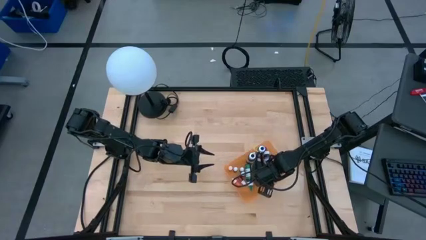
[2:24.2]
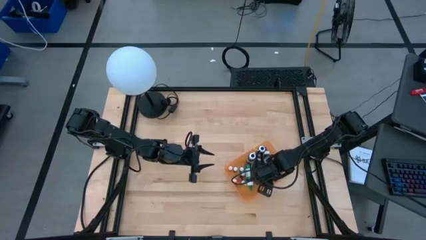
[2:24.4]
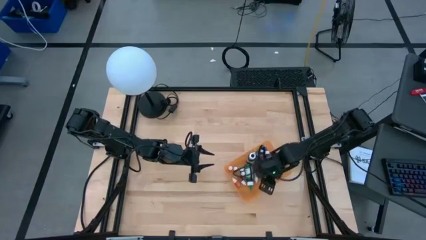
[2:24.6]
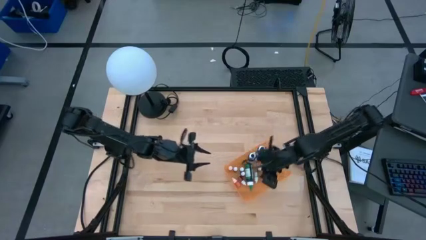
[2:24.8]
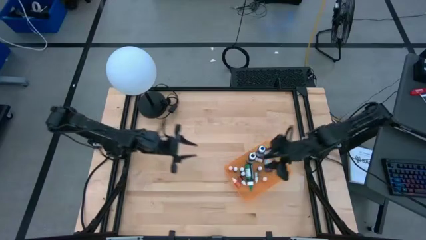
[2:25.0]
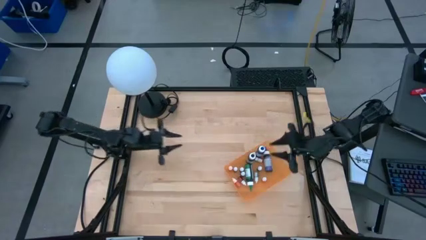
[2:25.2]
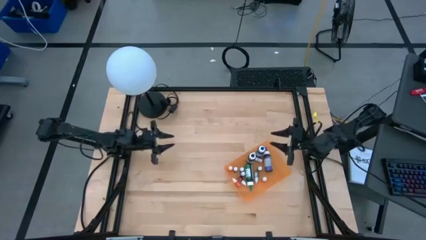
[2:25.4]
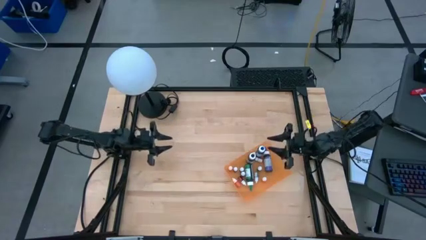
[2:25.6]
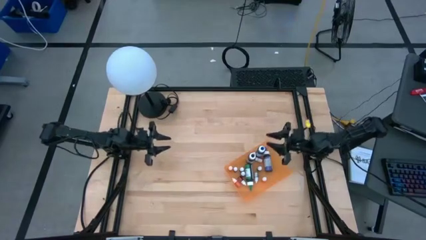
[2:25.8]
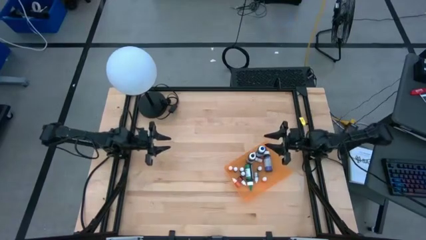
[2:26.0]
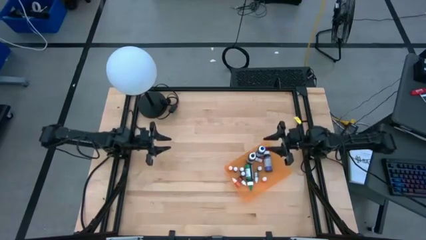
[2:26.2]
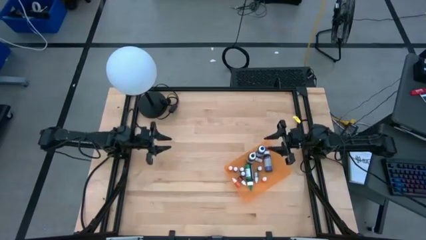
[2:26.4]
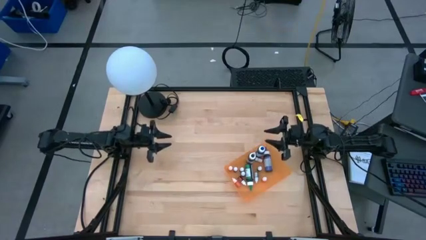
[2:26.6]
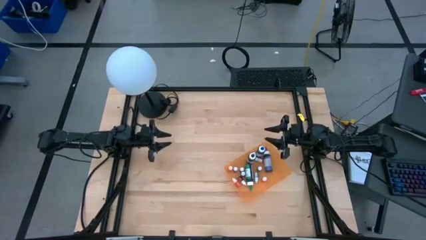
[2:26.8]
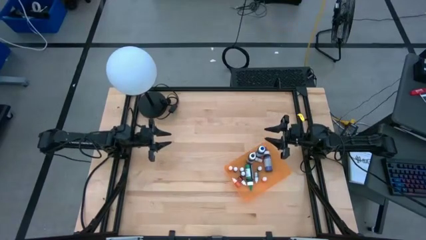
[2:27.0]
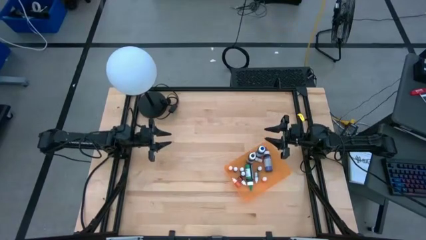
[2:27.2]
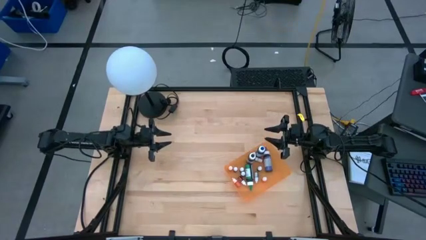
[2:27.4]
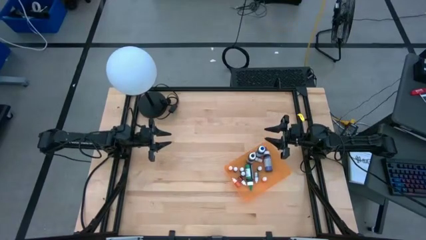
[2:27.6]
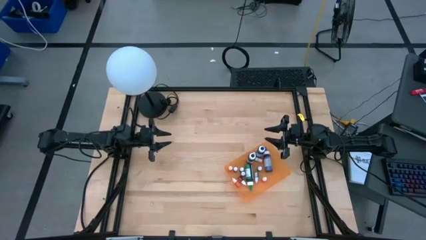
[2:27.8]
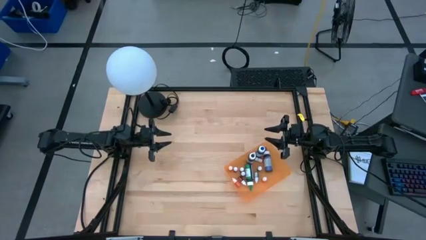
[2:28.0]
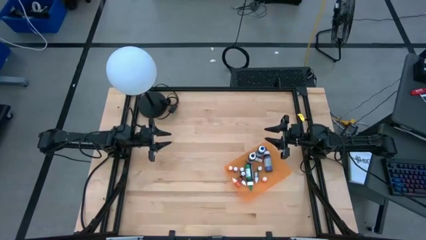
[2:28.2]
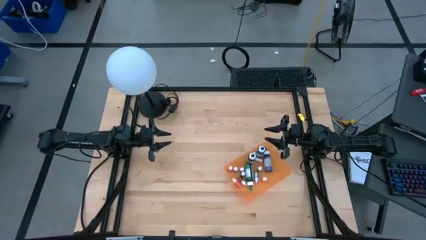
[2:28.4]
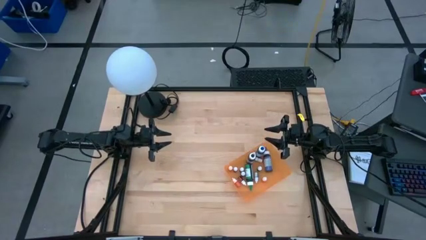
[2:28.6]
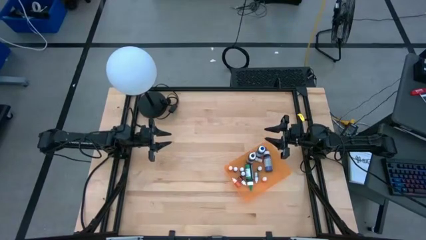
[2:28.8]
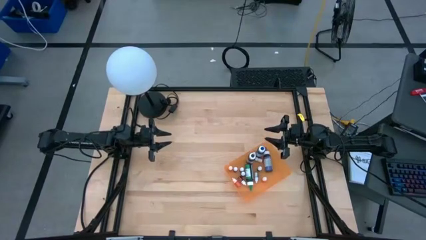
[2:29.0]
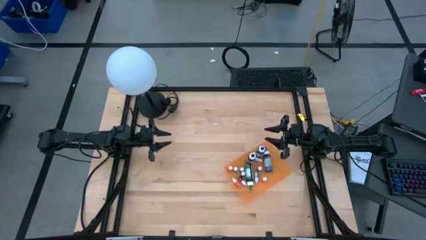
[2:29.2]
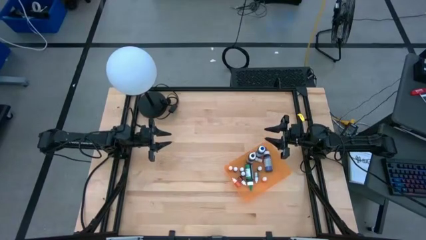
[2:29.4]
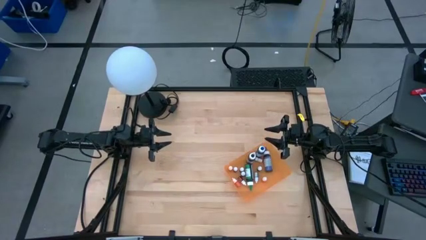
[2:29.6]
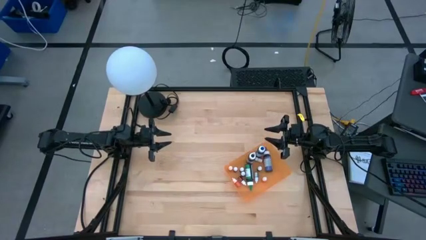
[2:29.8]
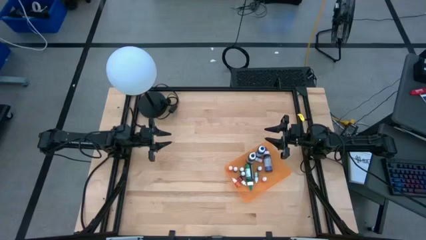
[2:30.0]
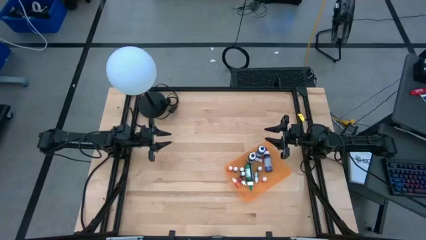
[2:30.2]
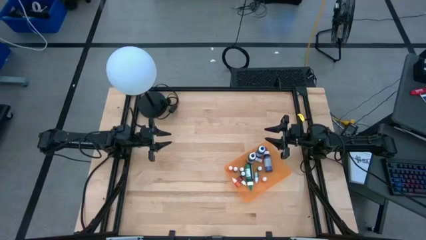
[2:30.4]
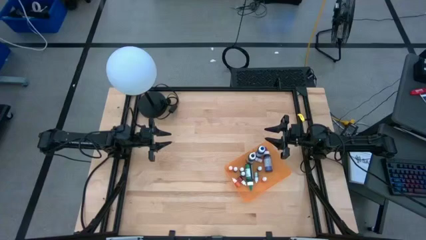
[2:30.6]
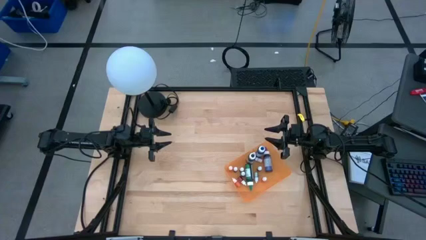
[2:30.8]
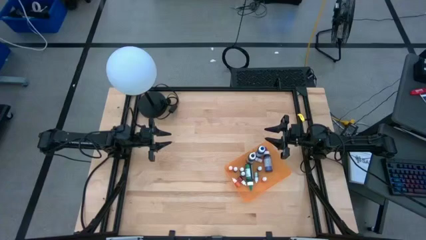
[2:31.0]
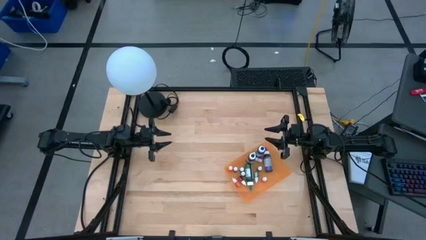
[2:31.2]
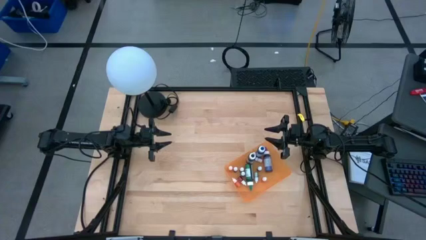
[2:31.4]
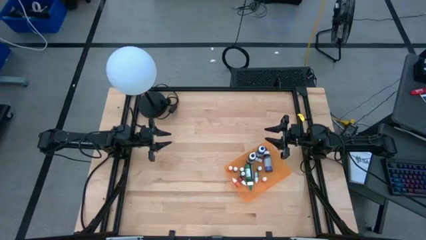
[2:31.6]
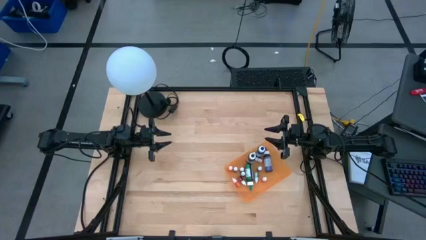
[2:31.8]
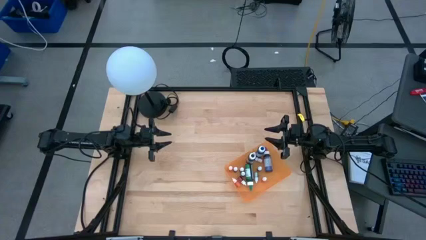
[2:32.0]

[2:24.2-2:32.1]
Task: Pick & Place food coloring
Return to Home Position

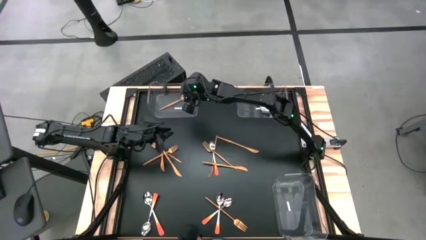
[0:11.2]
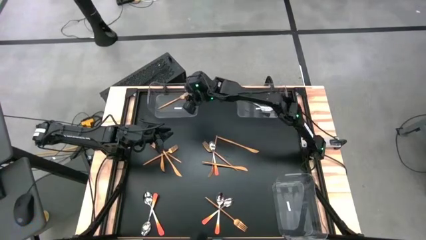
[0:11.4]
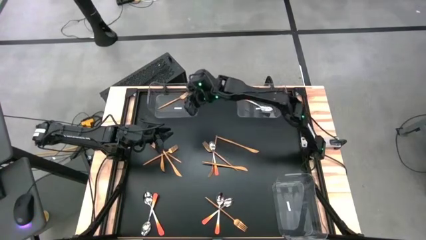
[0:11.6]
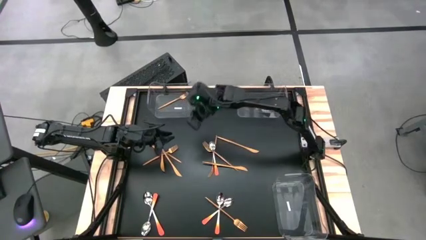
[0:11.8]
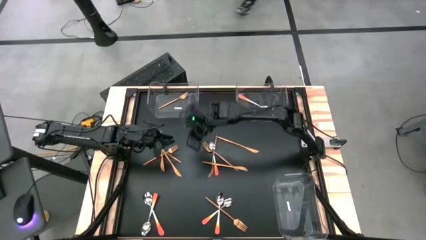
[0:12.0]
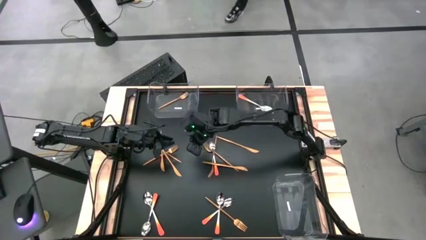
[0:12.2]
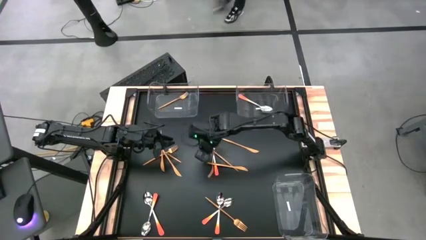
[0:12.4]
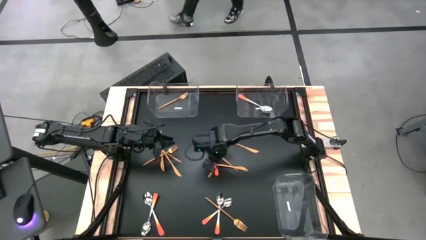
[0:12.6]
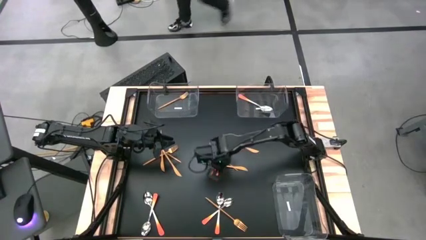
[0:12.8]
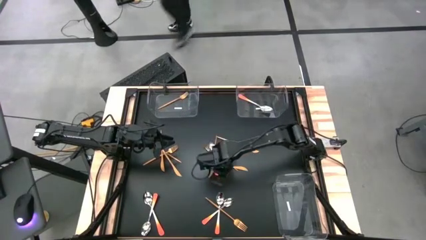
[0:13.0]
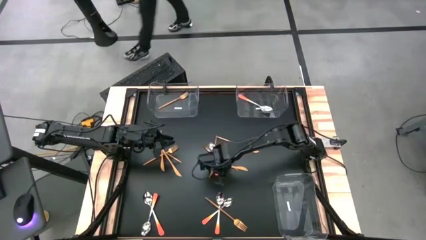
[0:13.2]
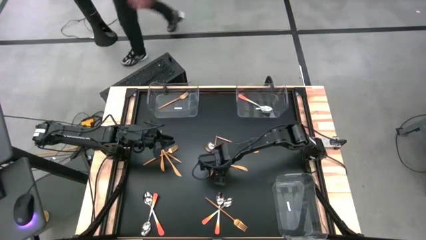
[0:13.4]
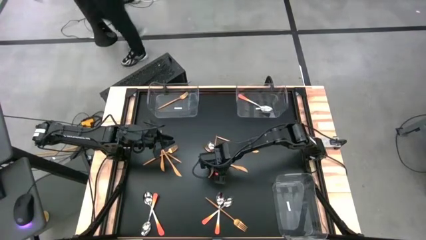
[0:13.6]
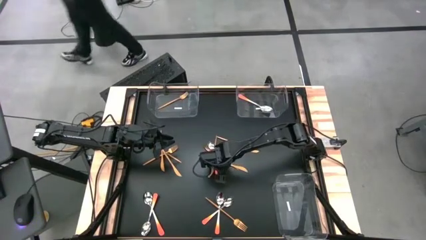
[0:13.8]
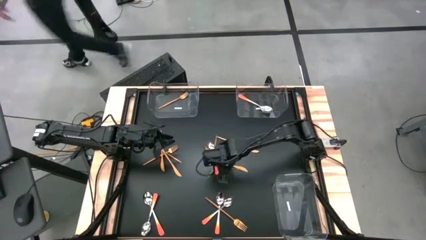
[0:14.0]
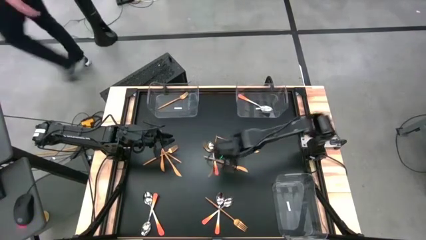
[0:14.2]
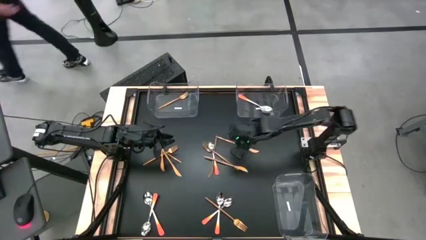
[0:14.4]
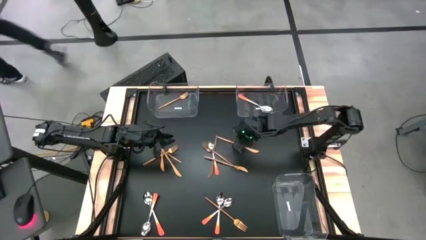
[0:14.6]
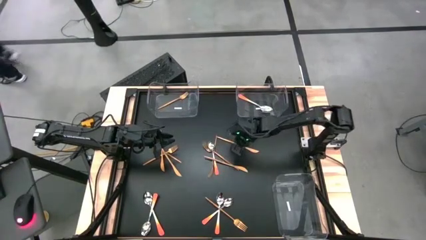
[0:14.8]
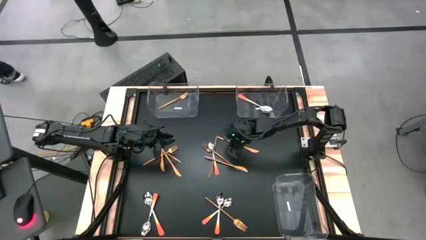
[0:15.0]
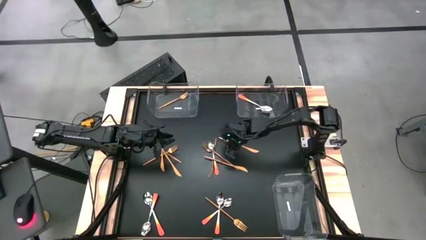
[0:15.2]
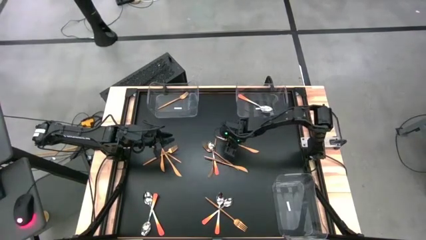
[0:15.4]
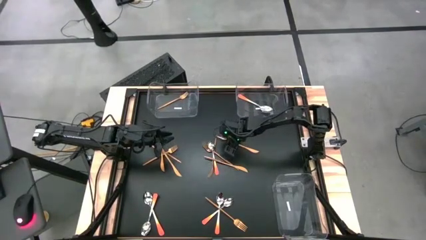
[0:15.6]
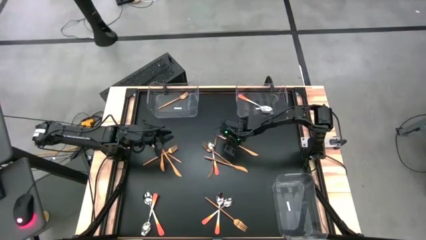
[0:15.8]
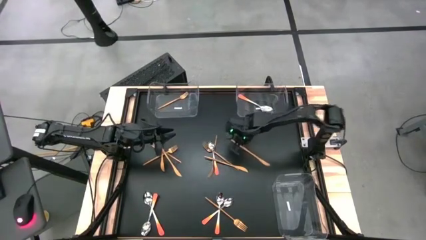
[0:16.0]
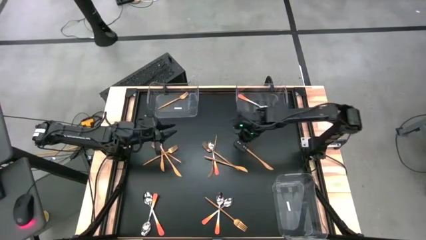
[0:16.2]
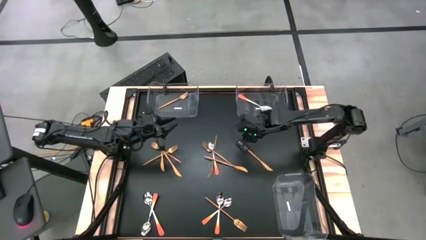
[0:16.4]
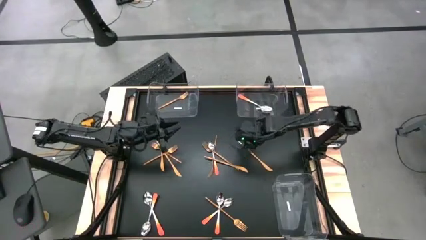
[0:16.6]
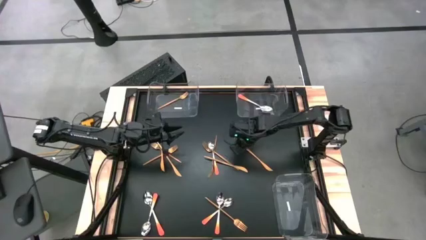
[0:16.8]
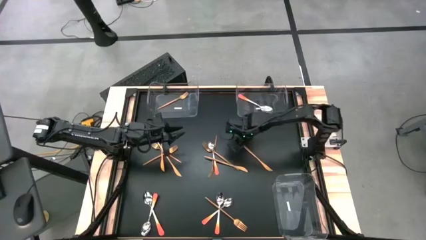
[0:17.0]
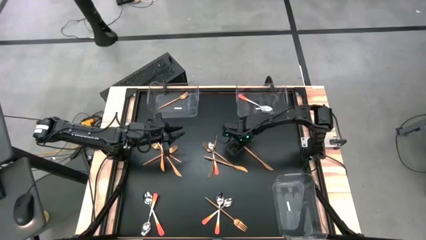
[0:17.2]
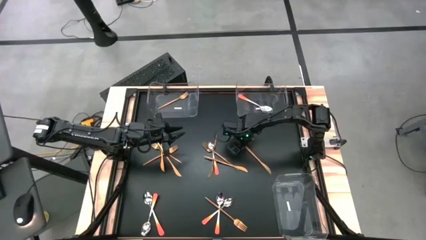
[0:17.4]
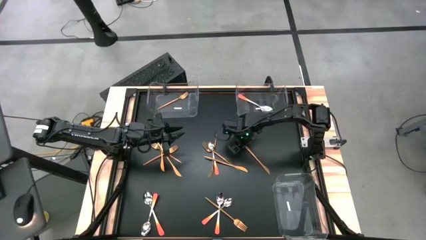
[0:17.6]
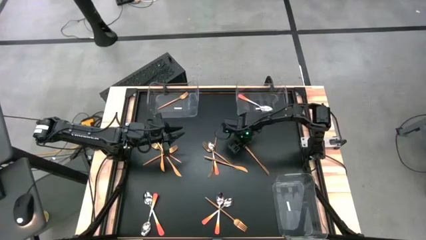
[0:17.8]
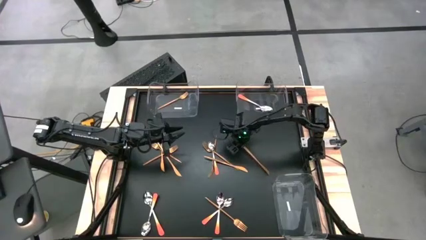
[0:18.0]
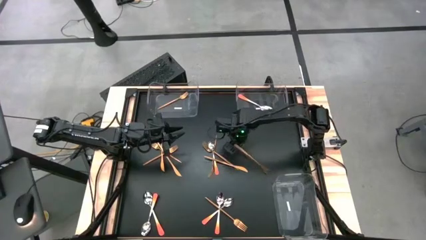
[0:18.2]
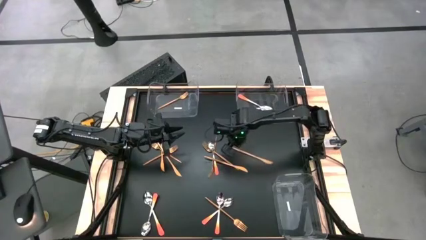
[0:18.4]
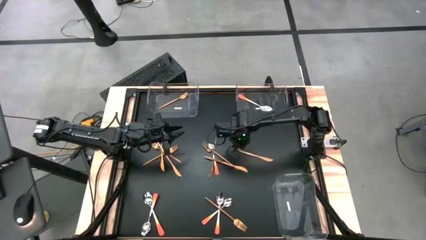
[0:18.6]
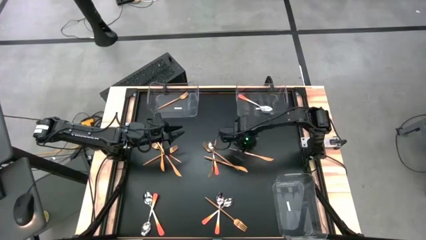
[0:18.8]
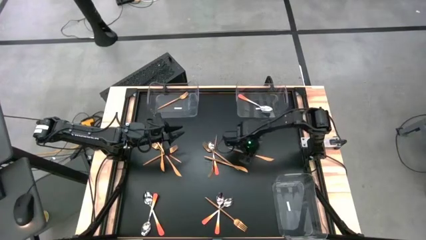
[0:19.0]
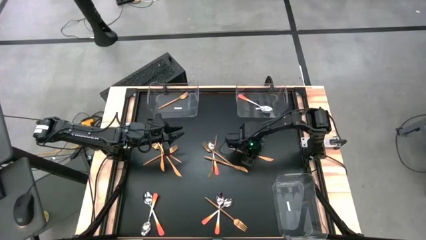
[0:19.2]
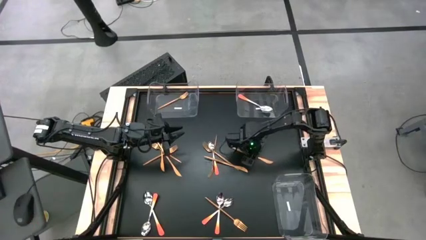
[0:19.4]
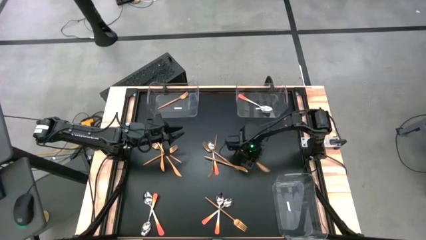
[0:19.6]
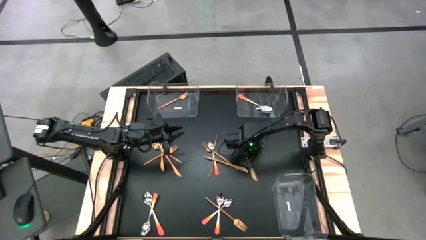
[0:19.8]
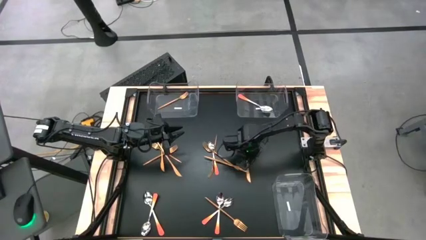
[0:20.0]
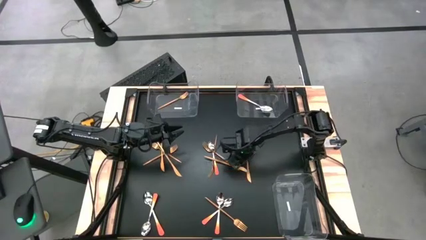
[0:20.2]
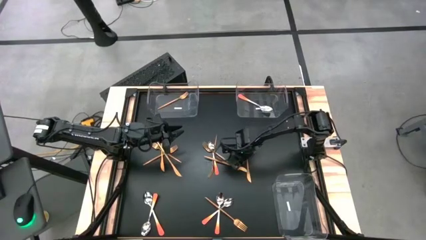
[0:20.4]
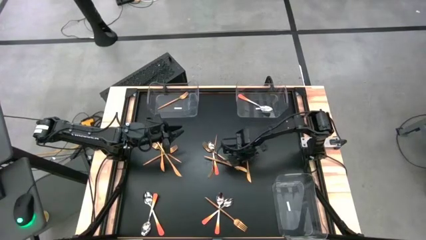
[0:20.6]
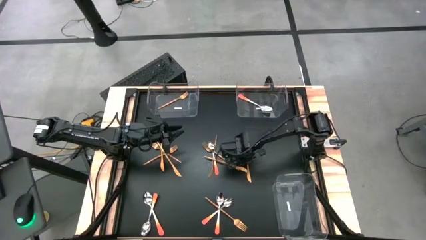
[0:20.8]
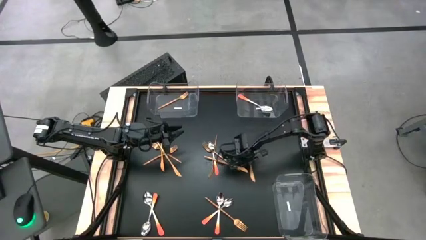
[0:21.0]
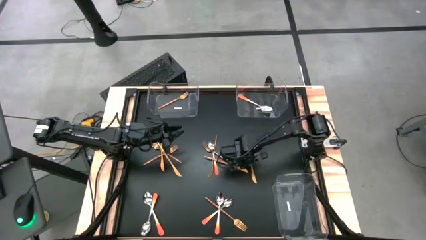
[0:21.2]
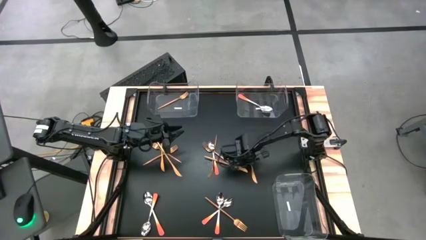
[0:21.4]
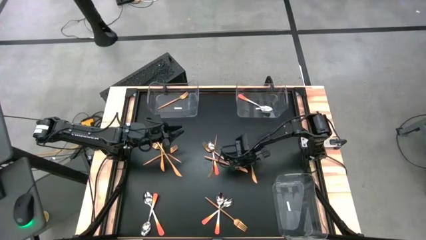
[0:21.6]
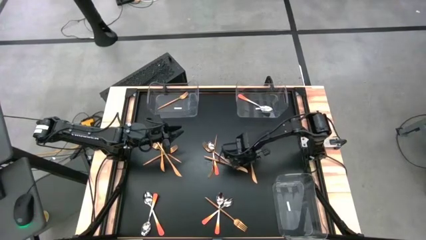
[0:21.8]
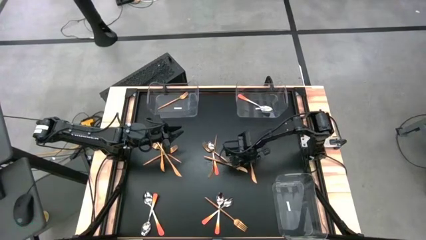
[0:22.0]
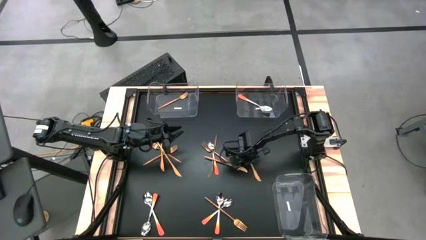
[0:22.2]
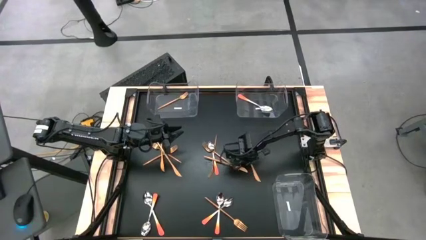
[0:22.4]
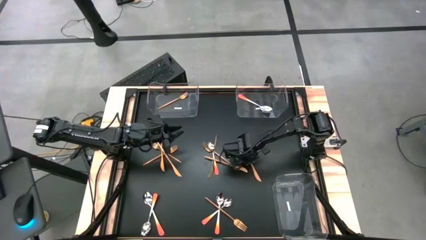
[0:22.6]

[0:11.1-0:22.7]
Task: Sort silverware by color (type)
Put the gold table knife into the bottom left transparent bin
